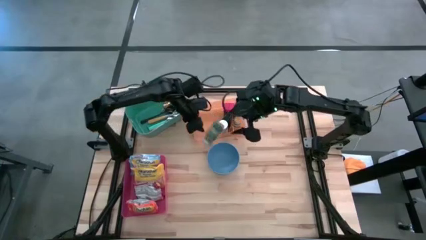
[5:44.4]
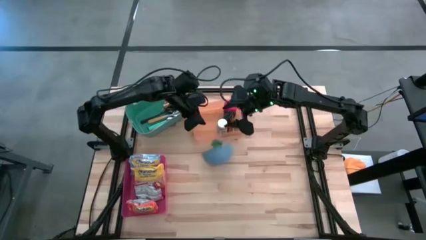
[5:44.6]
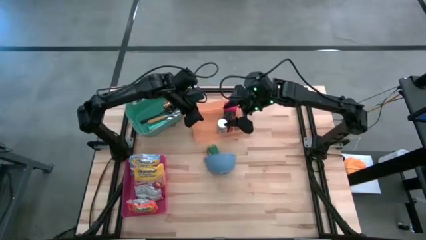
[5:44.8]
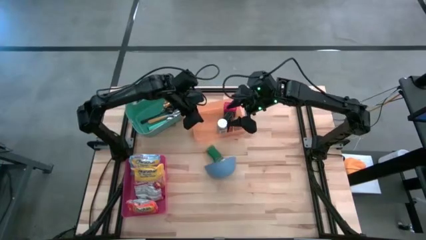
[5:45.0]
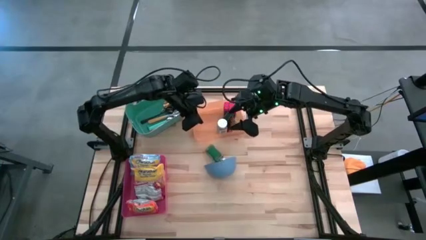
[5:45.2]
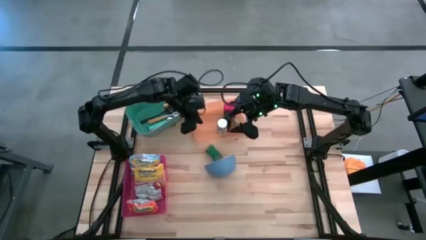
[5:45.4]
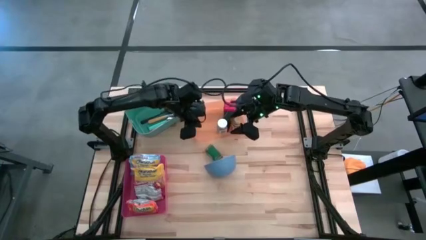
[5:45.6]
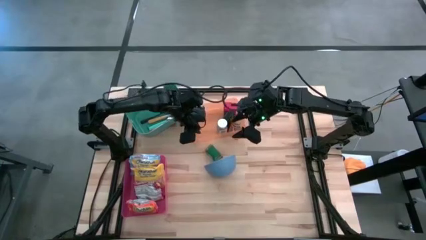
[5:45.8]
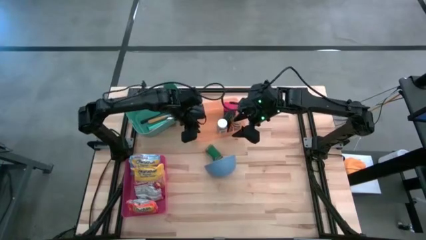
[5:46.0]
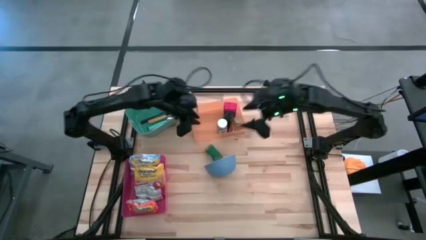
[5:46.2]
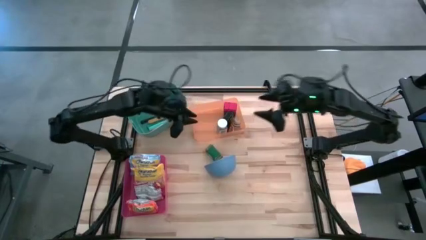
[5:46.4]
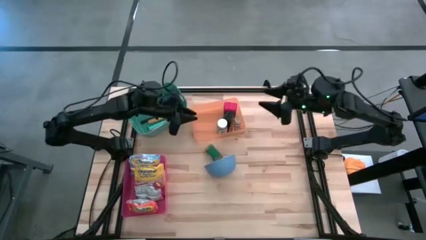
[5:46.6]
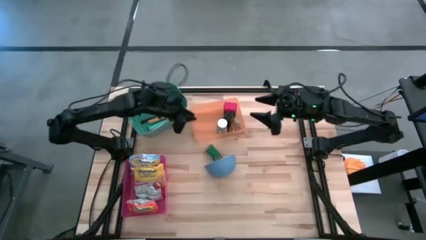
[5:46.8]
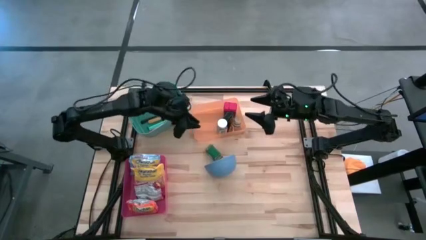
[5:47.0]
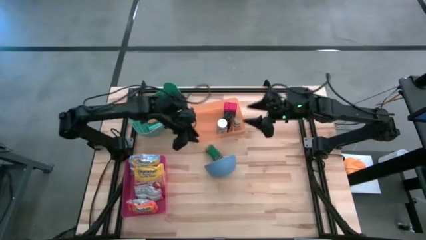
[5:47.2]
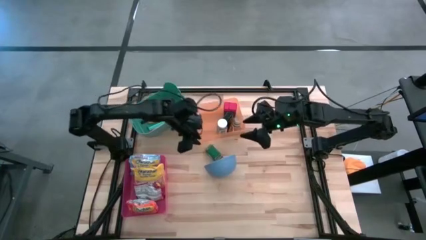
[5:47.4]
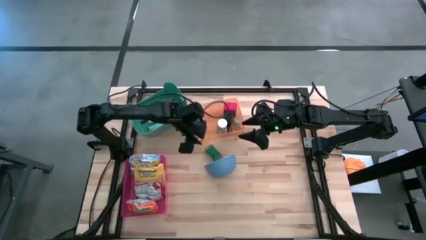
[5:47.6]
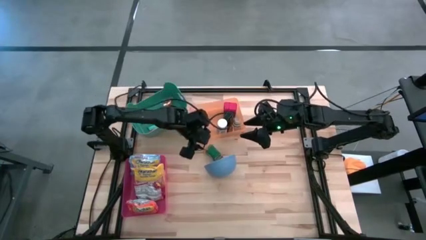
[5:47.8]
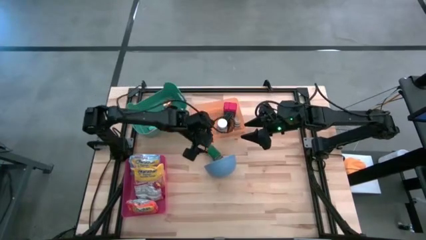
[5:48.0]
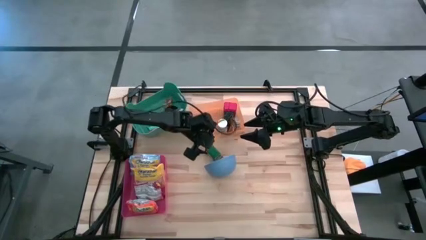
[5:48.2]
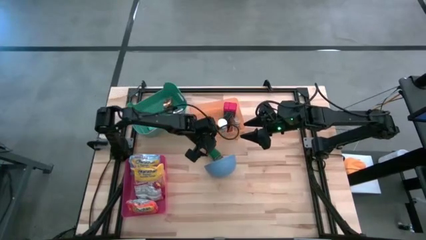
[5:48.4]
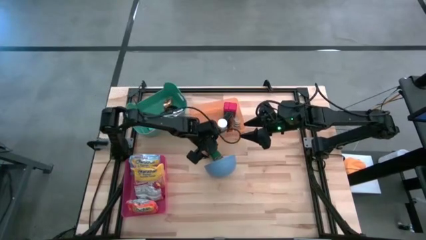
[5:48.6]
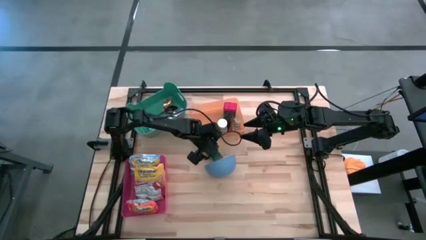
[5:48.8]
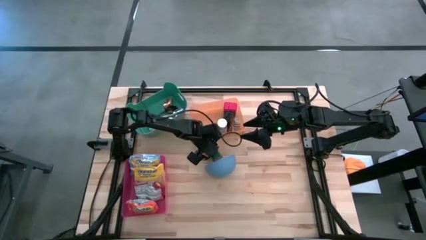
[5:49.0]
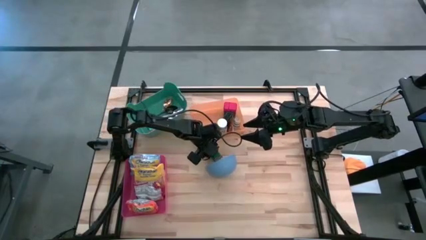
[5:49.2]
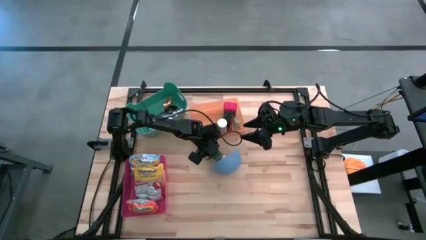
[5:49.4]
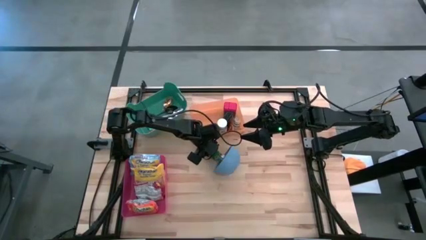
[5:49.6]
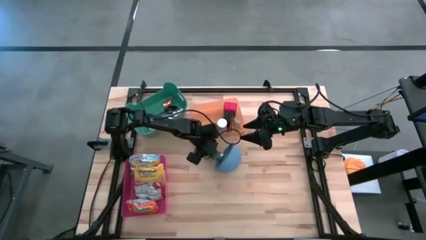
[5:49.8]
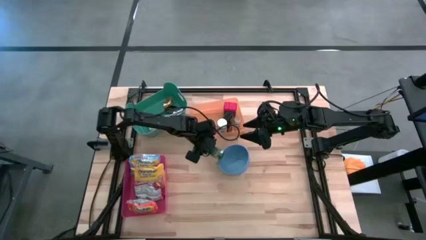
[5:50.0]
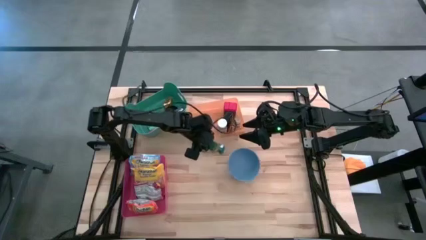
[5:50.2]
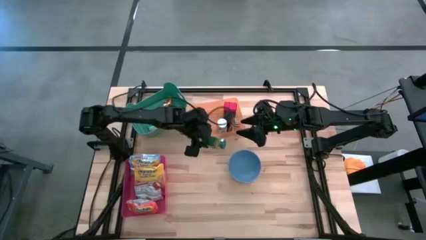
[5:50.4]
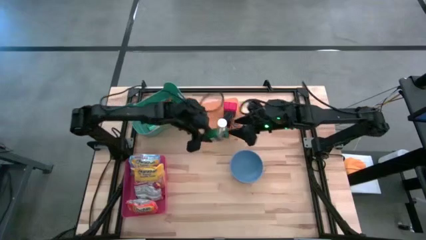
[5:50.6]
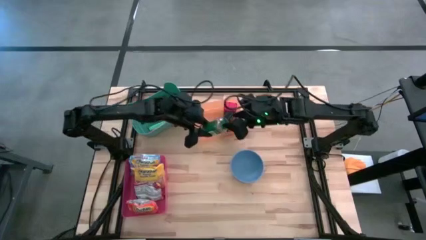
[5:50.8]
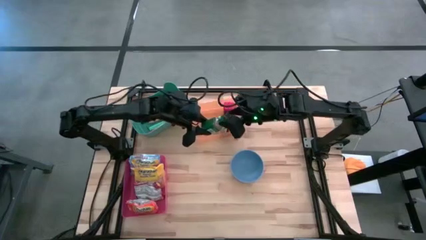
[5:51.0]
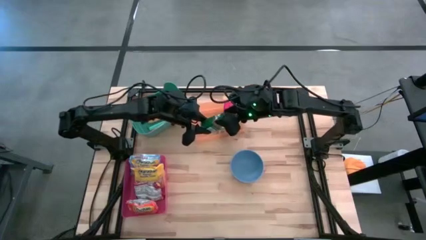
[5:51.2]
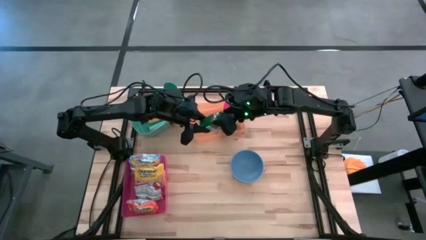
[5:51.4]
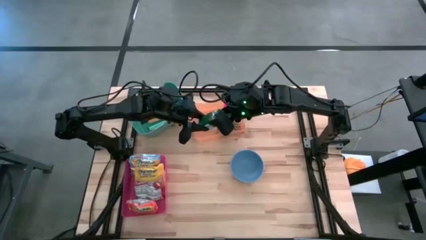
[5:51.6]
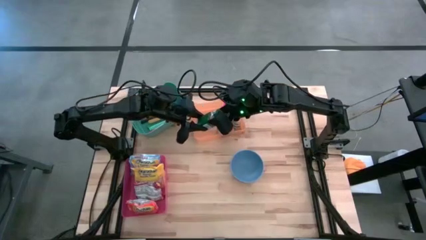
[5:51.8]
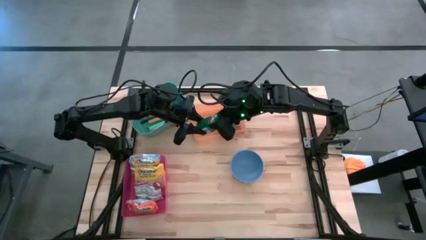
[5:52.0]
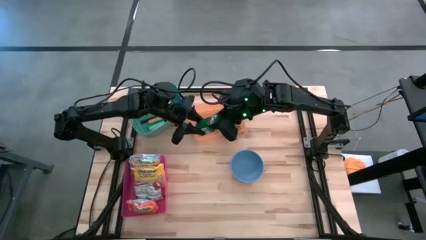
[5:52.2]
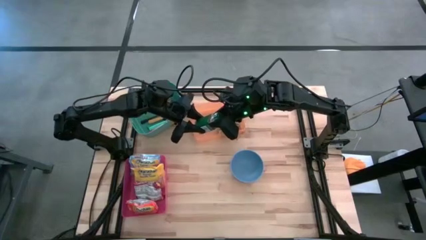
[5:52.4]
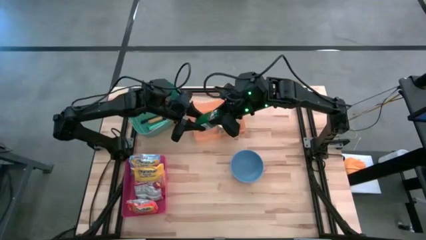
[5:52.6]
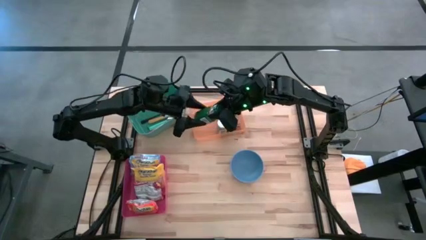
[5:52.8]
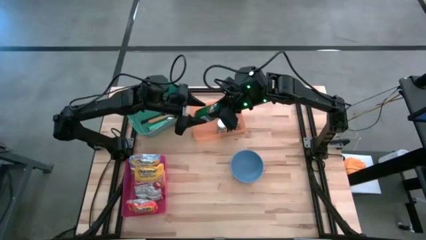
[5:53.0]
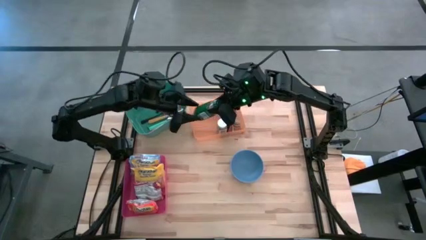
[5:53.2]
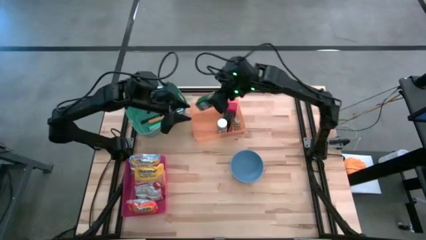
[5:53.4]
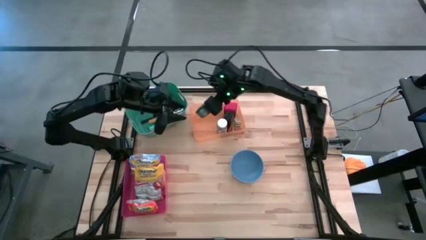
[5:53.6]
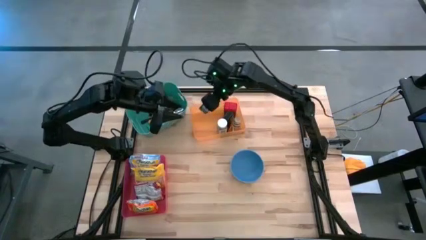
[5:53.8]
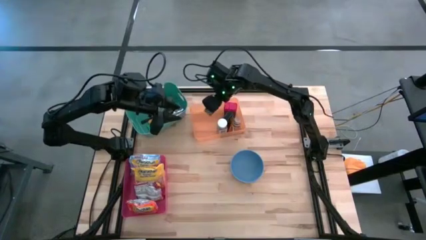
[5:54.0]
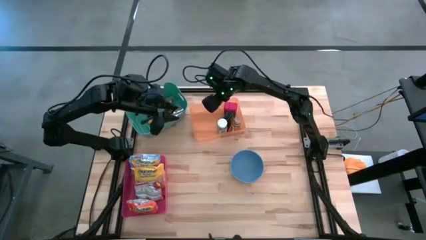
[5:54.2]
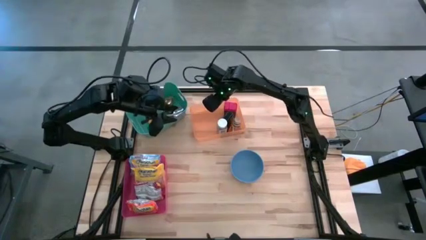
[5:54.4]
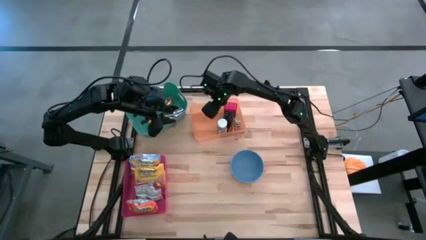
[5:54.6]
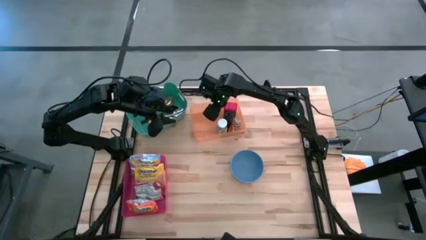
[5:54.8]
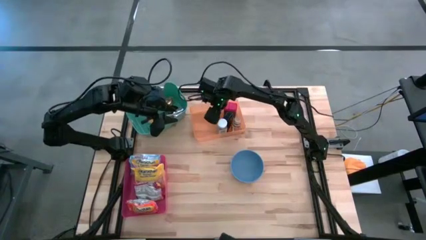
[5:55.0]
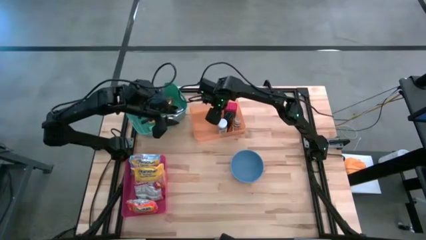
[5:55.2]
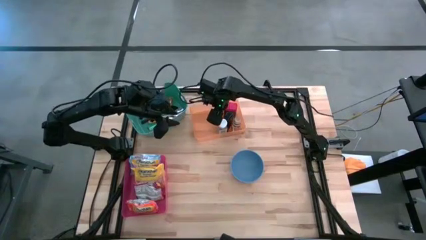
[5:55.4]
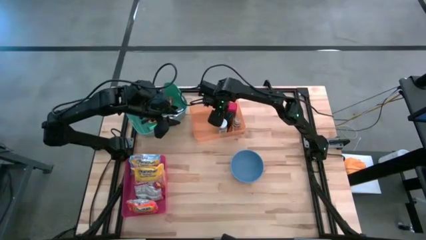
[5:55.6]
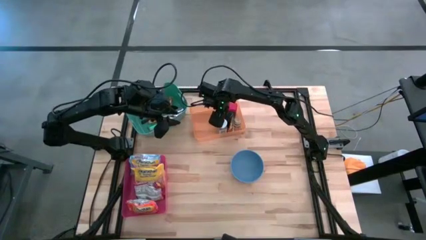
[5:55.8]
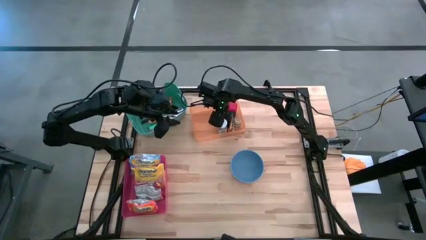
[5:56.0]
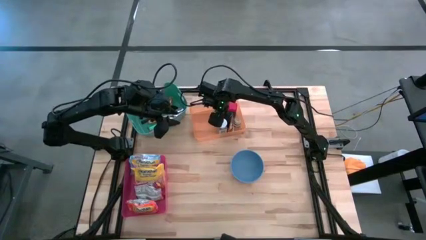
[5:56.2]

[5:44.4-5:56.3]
Put the green spice bottle into the orange bin

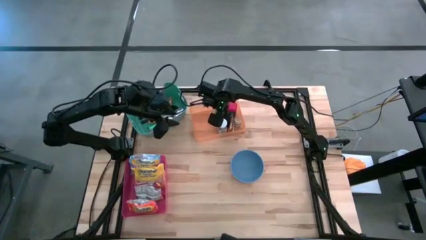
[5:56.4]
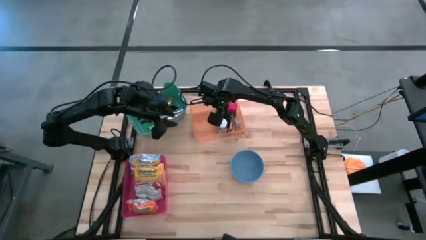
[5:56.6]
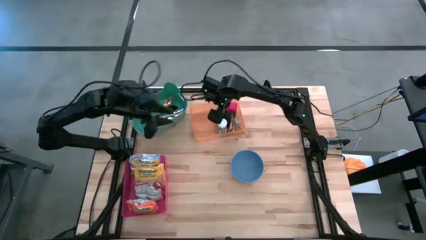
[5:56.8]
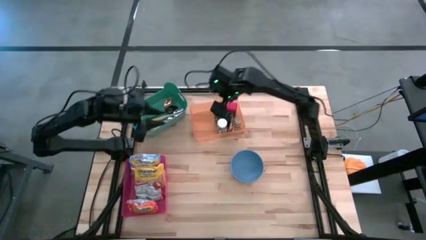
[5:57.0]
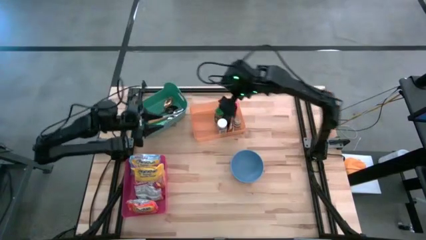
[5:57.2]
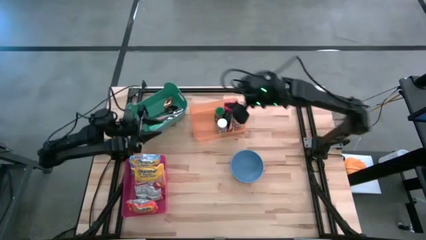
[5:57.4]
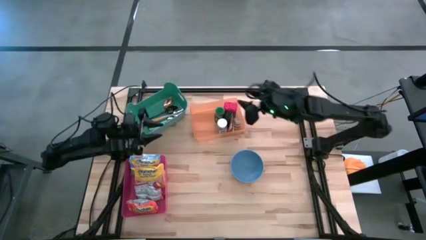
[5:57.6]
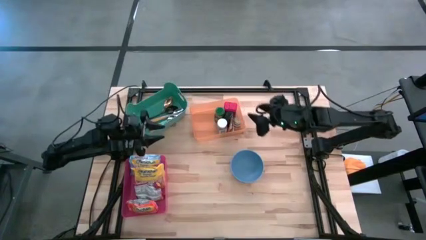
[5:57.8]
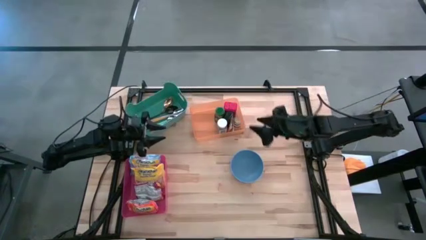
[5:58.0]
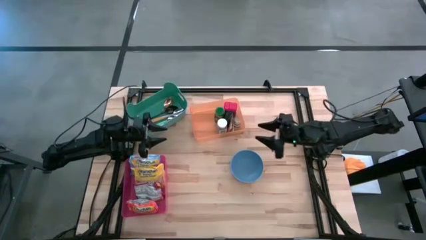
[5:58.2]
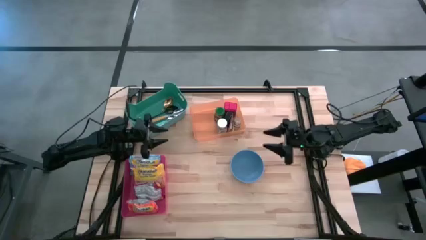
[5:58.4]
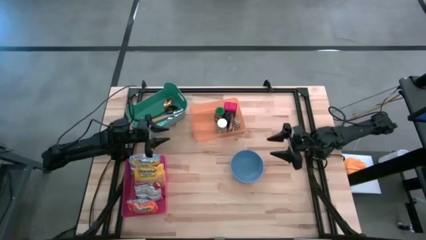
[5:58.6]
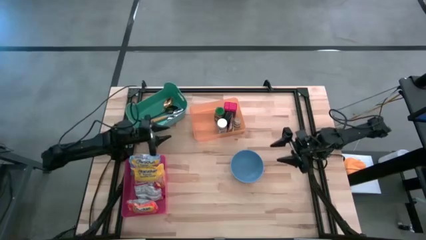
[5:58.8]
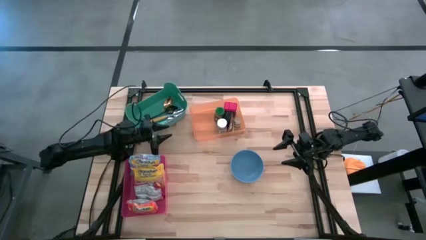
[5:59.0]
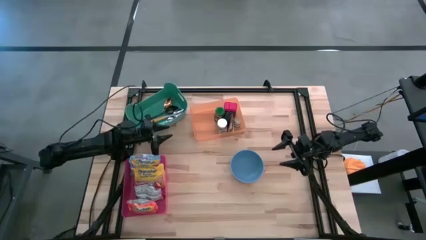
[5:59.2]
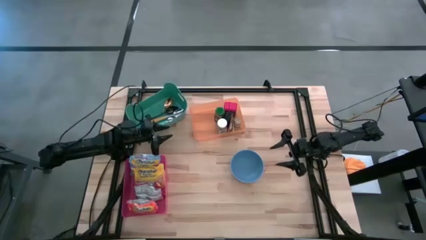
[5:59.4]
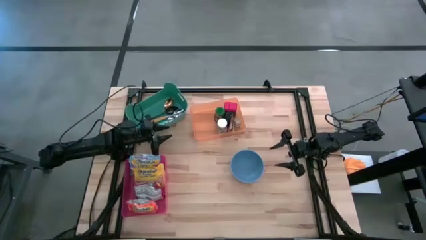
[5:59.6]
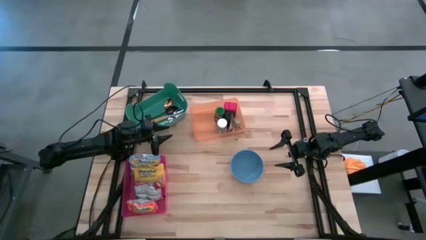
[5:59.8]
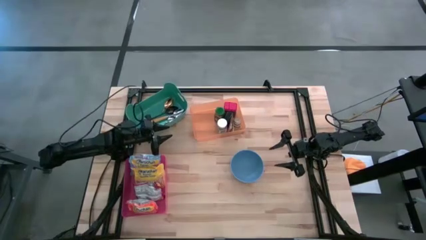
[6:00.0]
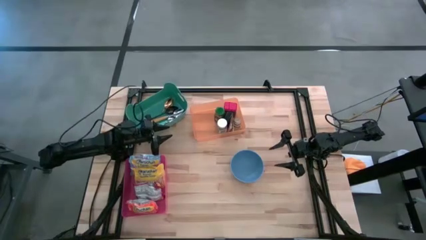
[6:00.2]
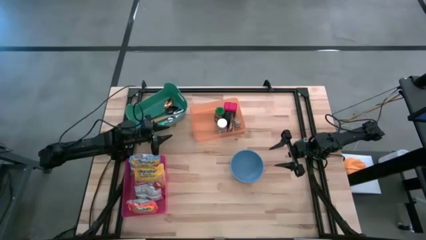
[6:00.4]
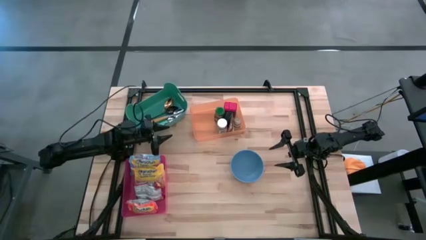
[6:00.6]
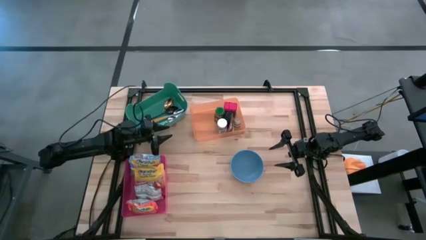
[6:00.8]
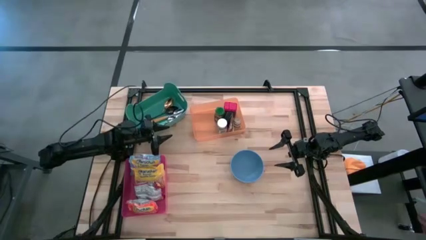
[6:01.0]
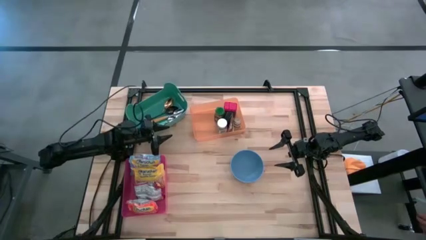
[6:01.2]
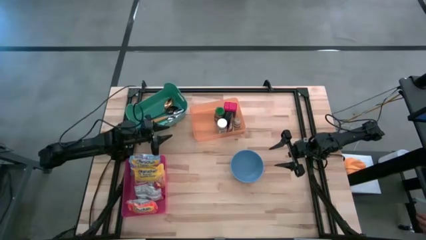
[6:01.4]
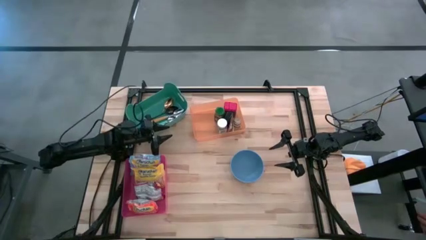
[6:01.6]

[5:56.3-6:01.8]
Return to Home Position
